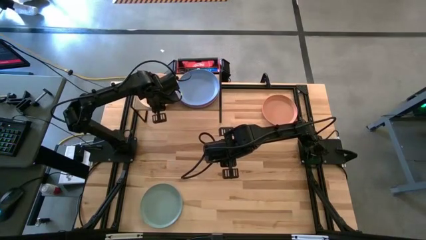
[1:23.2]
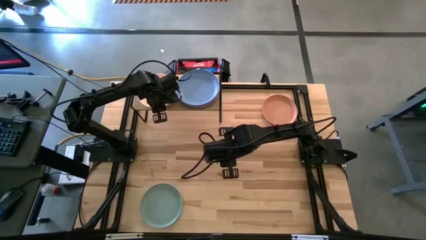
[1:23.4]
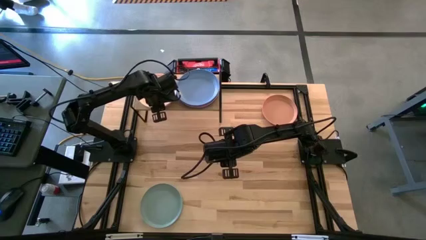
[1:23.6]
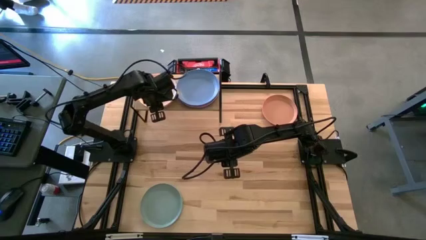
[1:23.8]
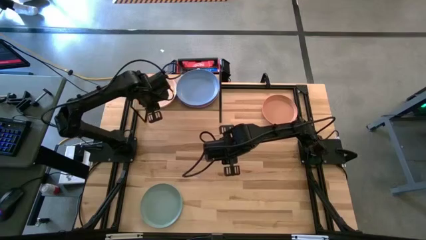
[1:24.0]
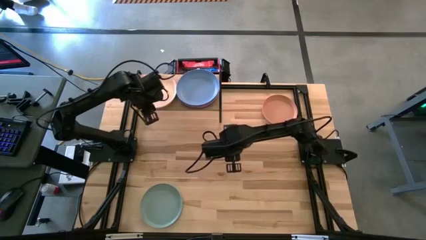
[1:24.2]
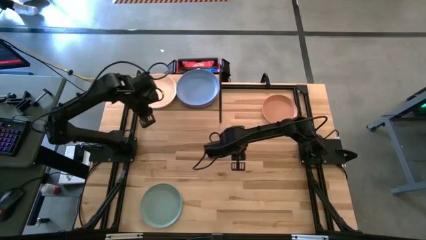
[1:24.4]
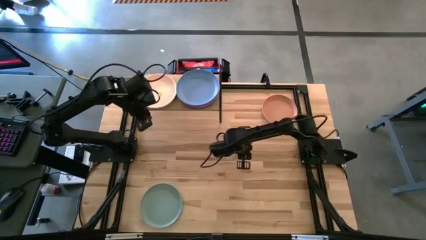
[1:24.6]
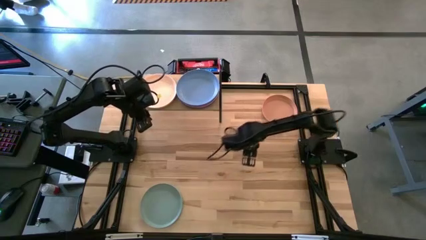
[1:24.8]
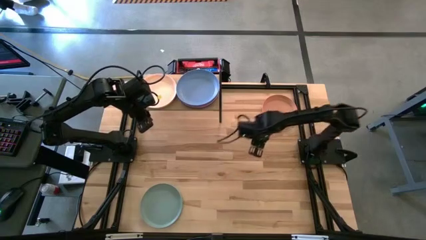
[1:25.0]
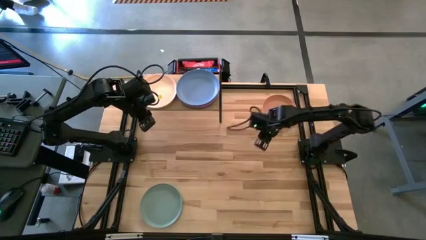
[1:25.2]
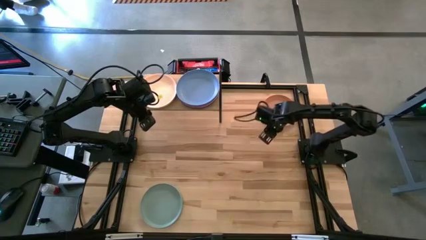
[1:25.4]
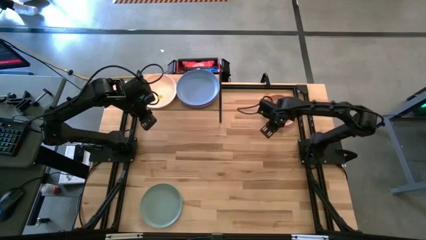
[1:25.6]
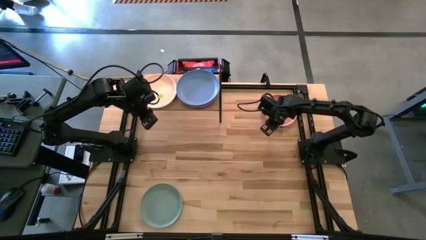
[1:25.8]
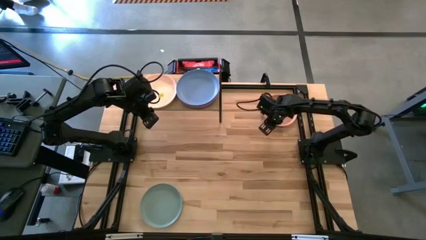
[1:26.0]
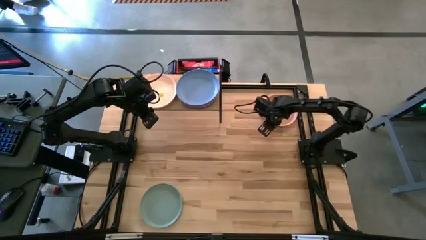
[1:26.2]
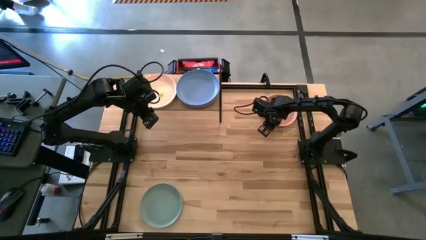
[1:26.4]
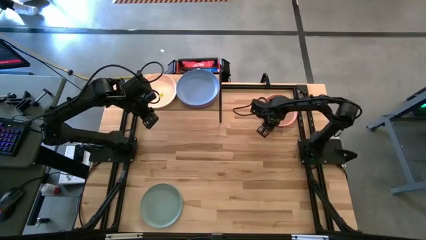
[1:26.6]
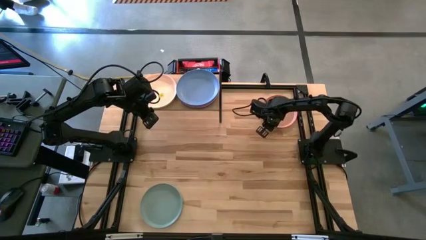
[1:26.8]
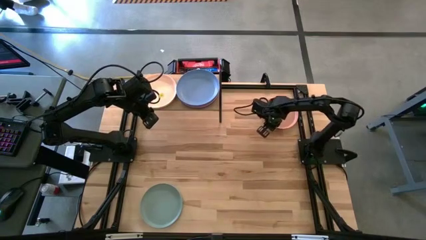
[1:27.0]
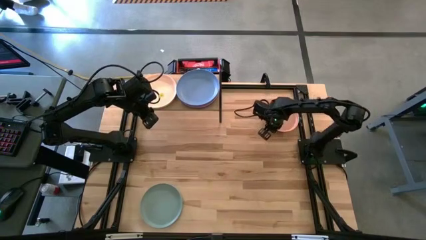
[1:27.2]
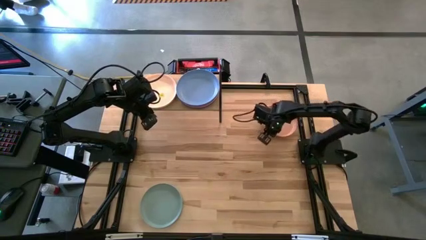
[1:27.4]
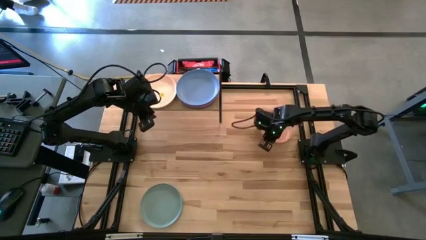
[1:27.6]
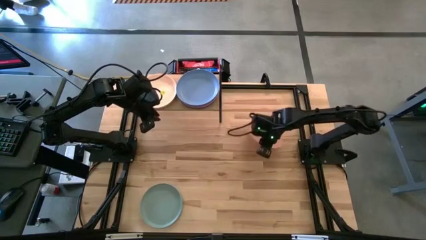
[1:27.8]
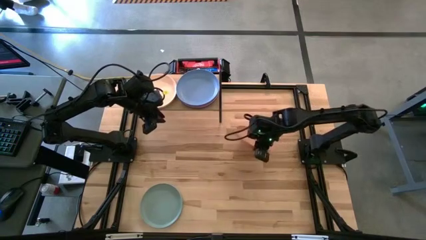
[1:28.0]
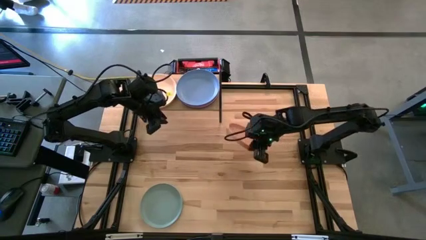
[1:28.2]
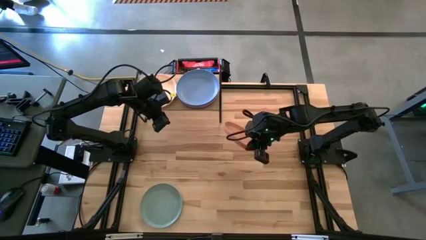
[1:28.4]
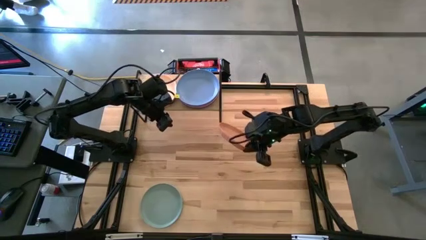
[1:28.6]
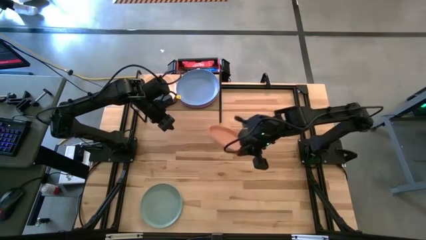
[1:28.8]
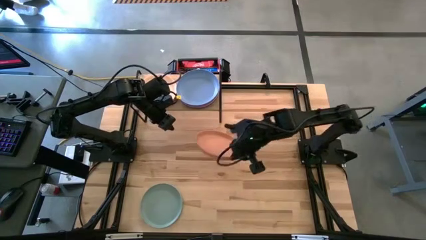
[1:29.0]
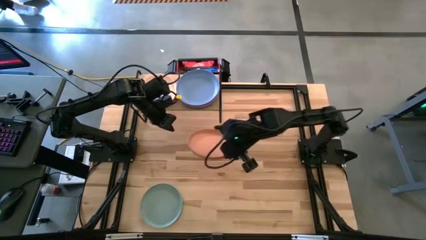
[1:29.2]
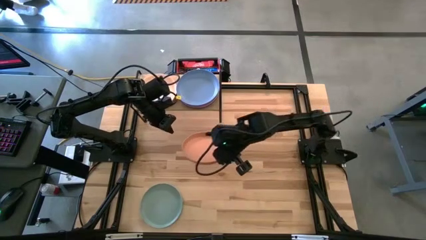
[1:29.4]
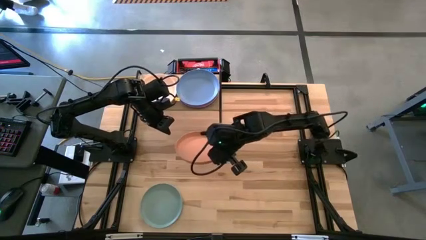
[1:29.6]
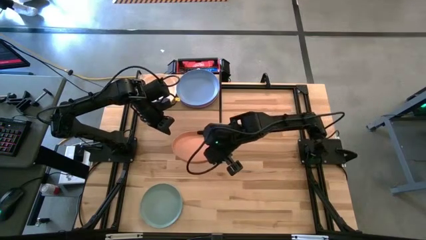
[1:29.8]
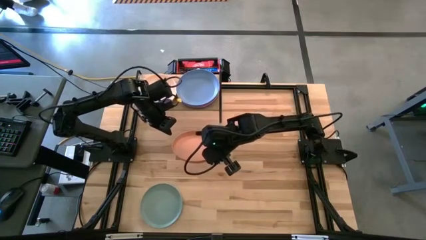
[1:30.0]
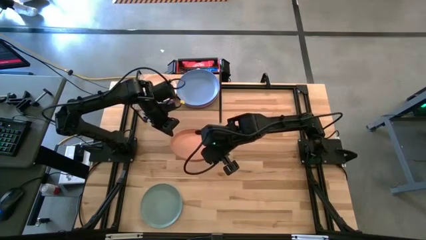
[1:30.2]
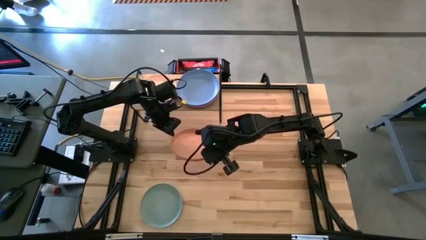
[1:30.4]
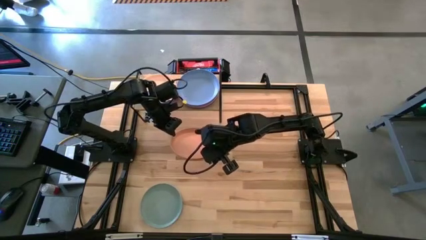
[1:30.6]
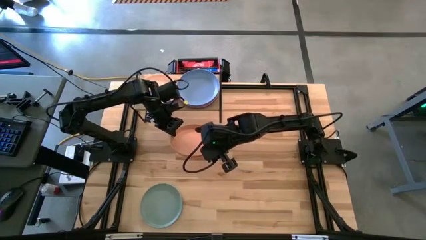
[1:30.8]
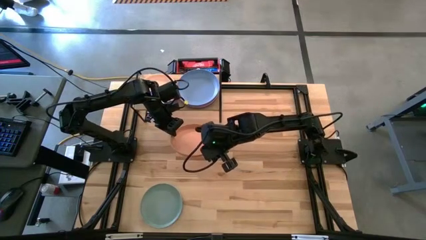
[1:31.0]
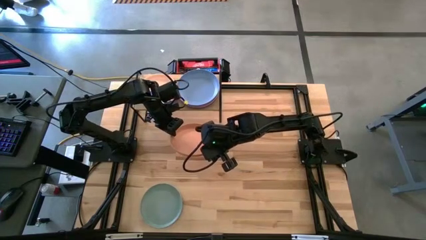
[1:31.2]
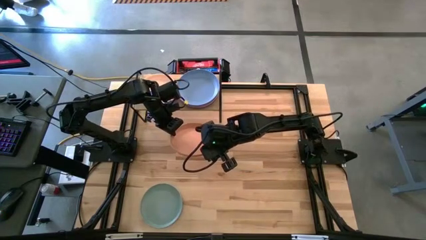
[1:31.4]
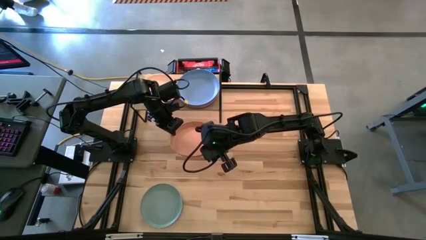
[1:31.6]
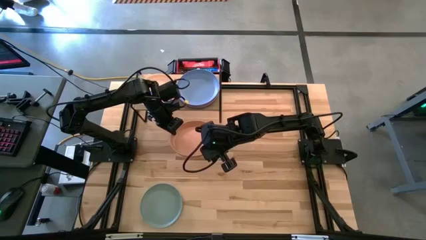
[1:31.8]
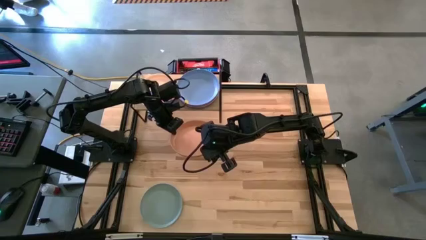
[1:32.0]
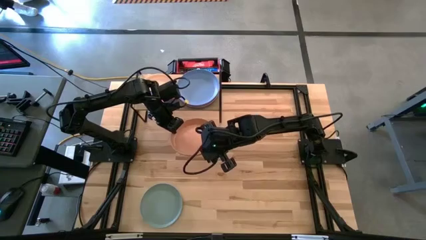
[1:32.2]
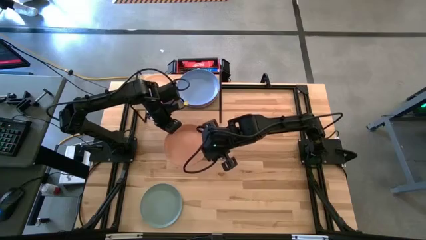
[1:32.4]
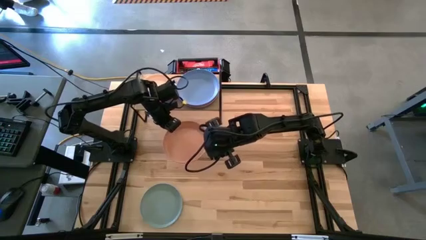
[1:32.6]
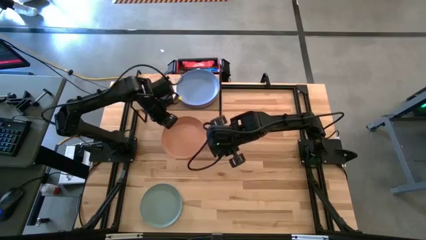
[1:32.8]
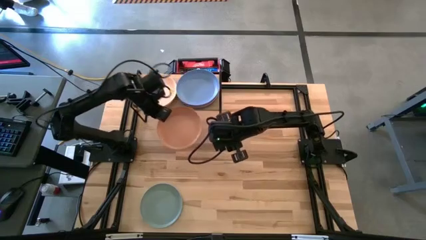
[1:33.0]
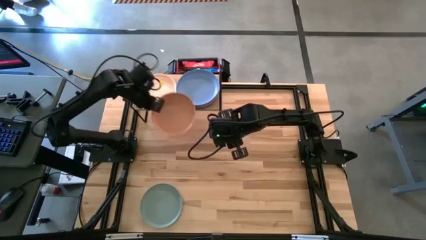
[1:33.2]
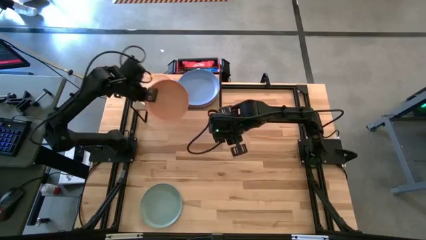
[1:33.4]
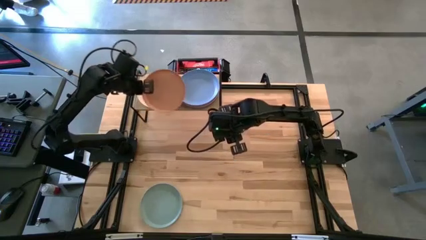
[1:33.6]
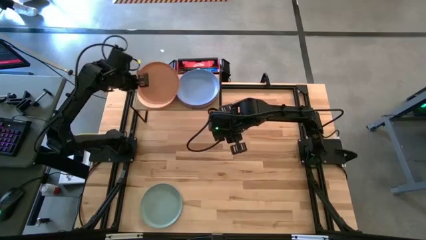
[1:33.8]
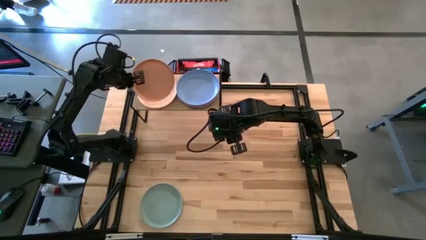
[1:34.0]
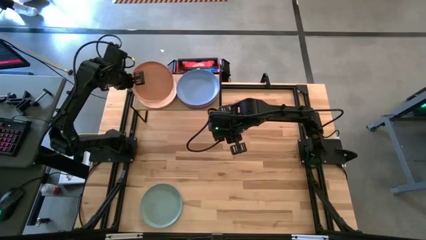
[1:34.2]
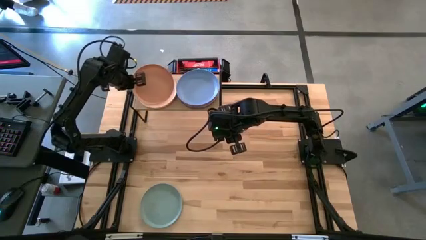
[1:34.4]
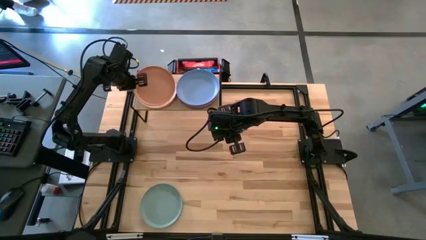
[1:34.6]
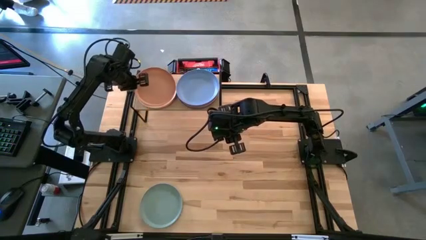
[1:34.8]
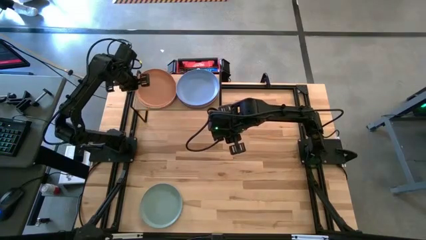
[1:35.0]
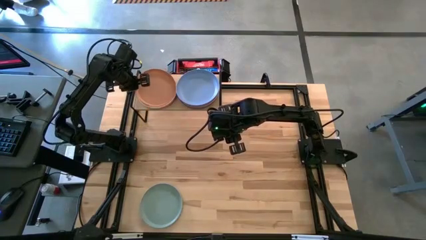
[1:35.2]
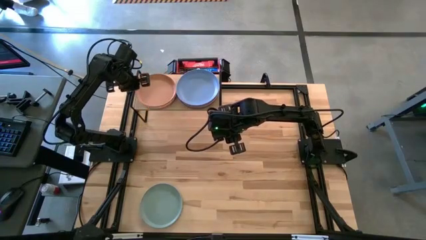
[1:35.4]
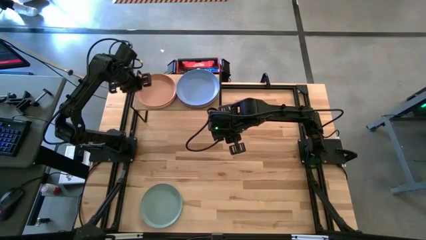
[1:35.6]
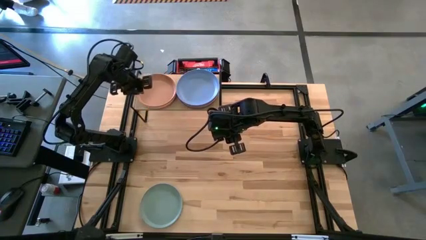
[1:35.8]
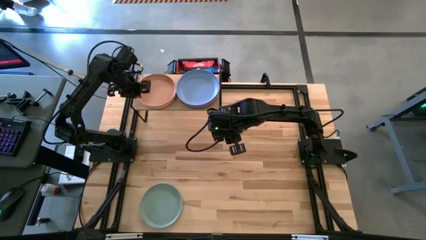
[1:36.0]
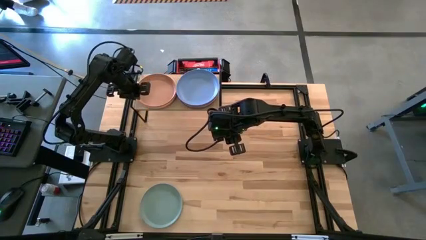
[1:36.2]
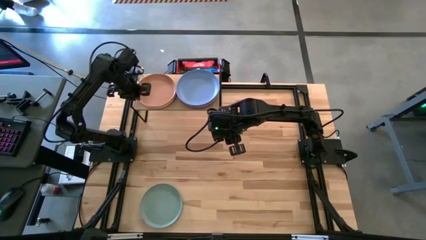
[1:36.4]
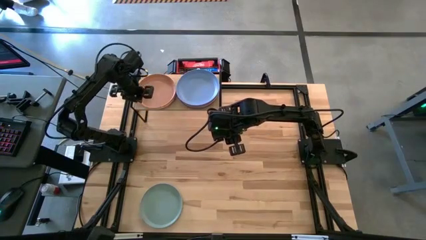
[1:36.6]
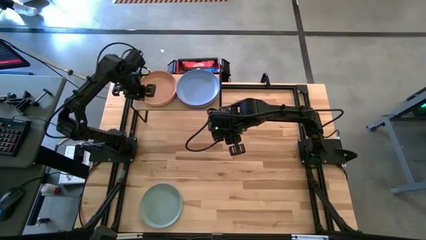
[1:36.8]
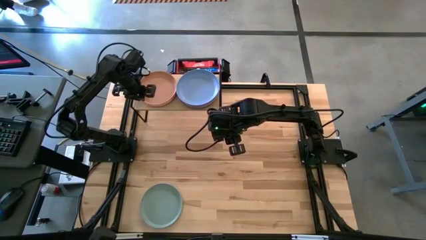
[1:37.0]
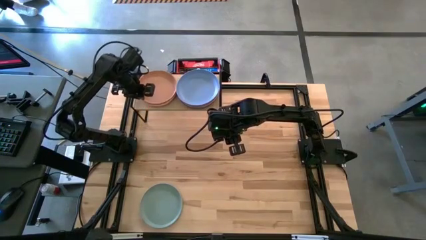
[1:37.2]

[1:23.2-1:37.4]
Task: Place and stack plates onto a shelf
Stack the light brown plate on top the light orange plate on the shelf

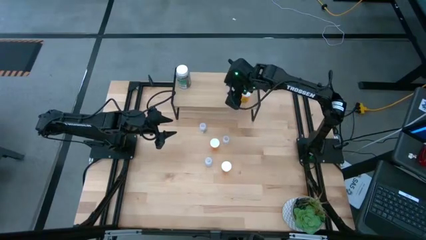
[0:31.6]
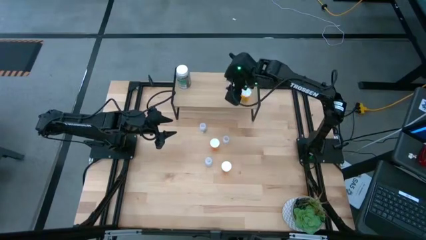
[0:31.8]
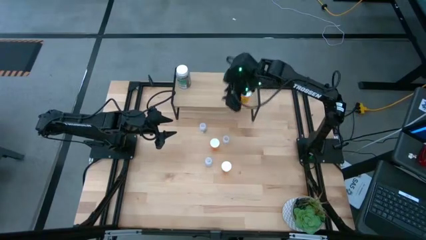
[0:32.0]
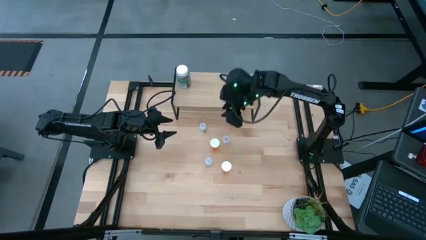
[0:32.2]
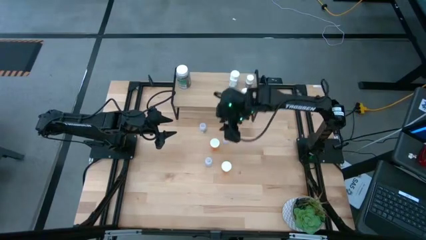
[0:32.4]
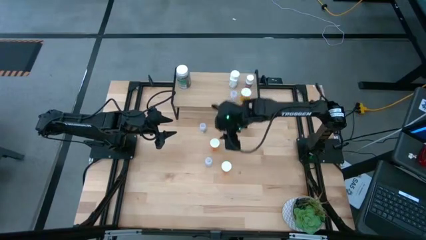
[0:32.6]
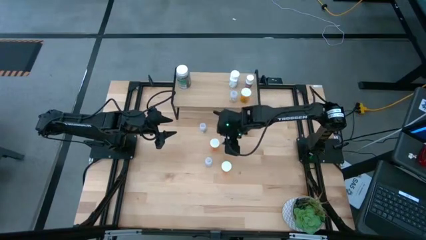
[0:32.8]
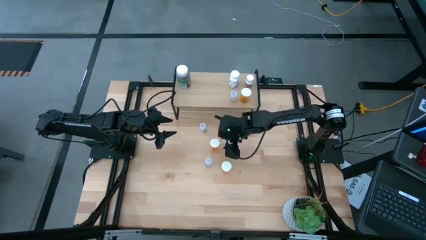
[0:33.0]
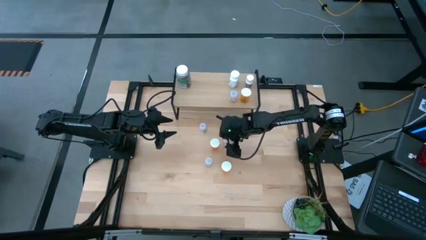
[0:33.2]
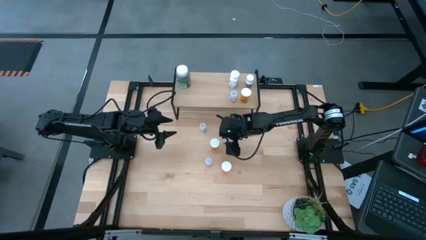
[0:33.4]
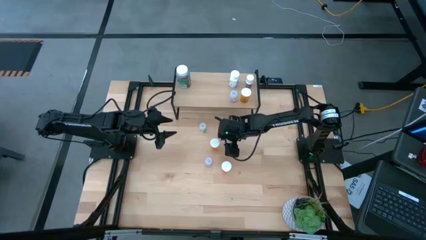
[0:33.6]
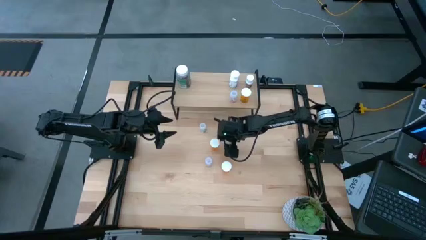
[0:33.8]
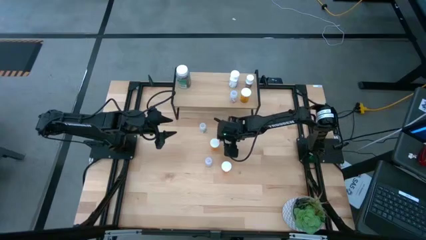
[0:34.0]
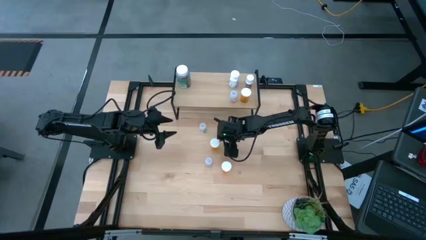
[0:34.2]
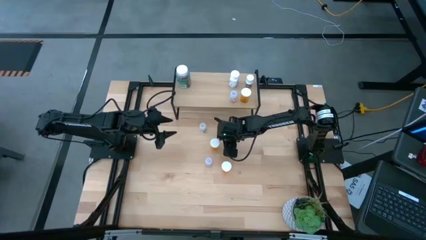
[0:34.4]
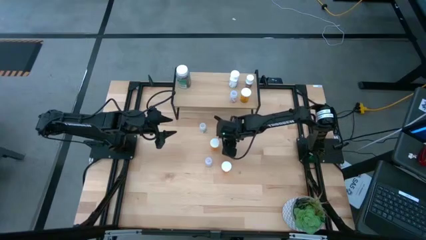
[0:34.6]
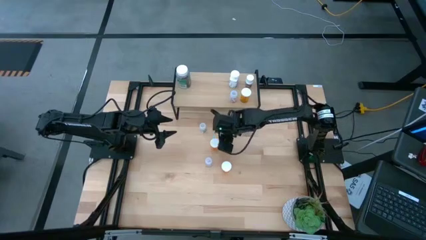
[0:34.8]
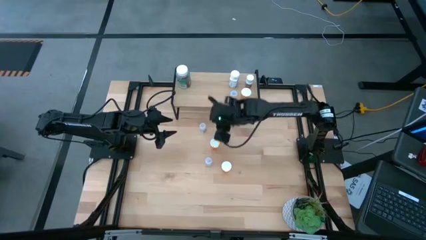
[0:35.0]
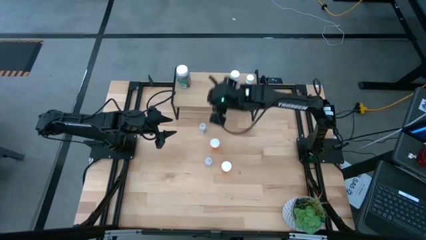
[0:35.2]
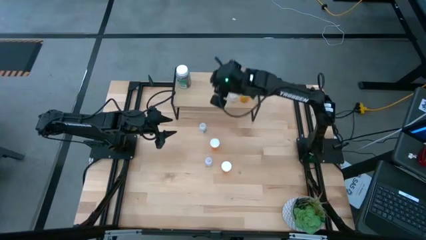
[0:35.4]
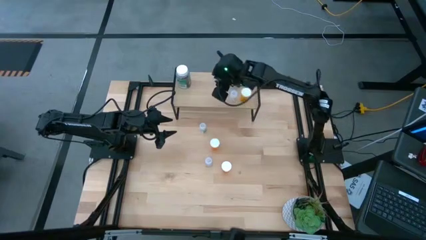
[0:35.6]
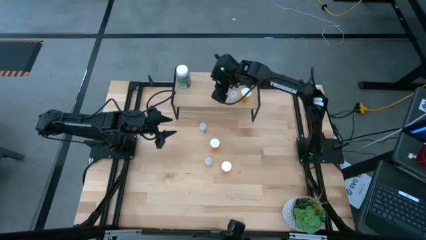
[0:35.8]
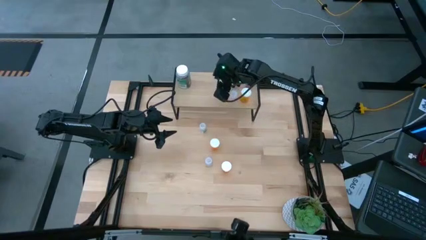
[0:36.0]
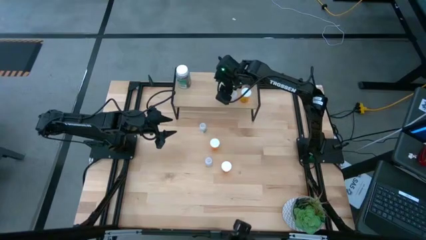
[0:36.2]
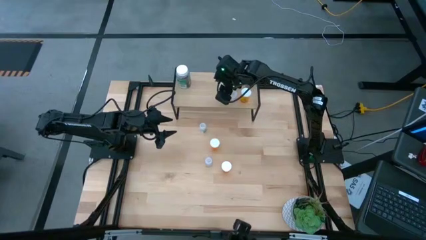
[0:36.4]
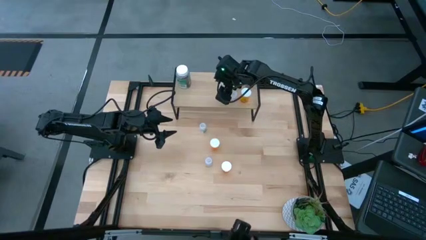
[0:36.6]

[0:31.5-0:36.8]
Task: Pick and place medicine bottles onto shelf by color
Put the transparent pill bottle on the shelf
